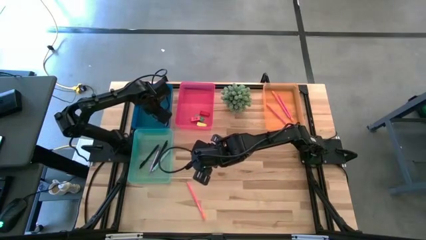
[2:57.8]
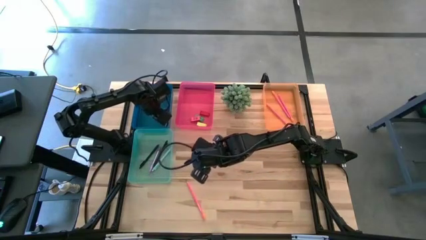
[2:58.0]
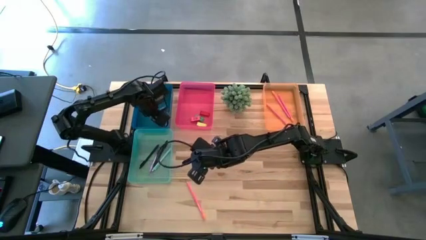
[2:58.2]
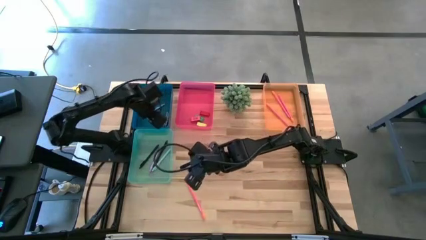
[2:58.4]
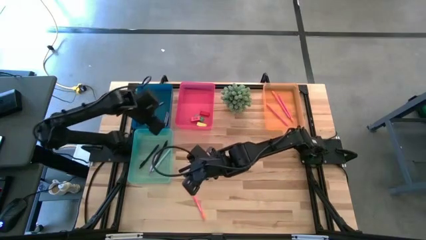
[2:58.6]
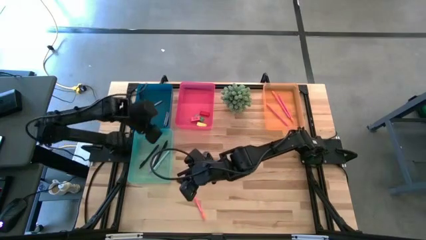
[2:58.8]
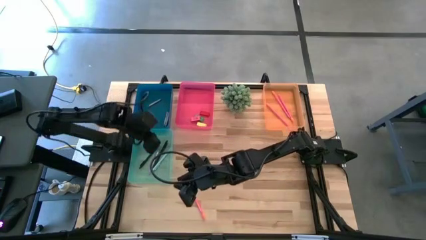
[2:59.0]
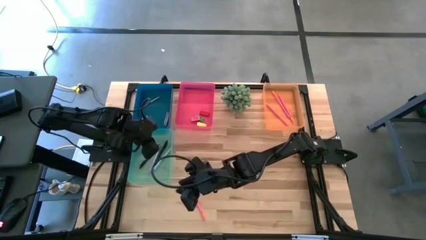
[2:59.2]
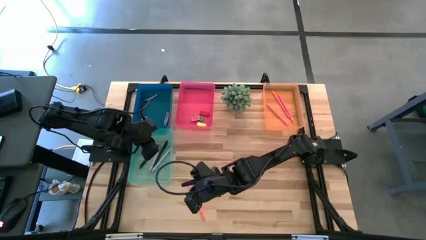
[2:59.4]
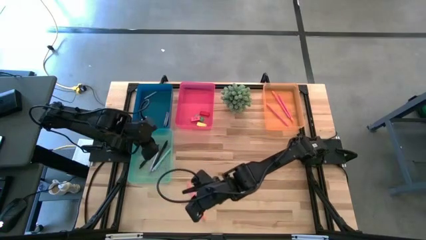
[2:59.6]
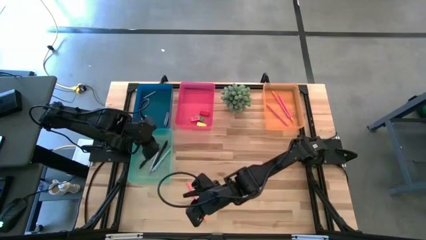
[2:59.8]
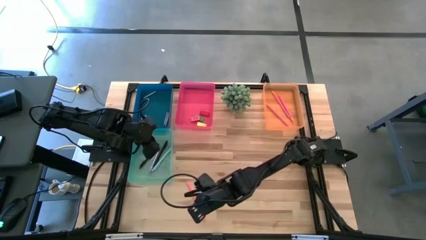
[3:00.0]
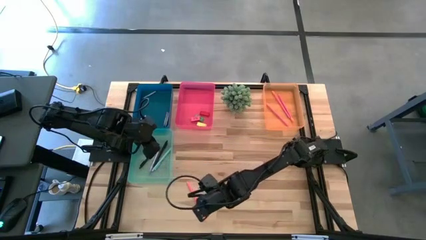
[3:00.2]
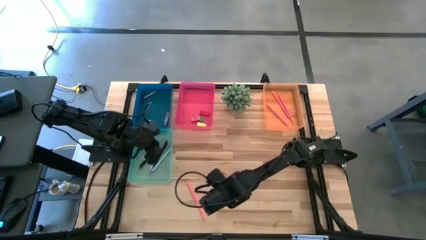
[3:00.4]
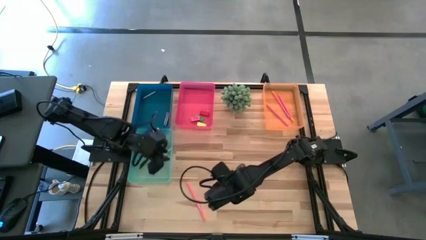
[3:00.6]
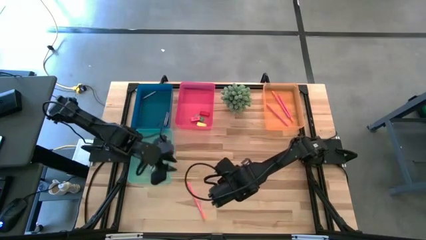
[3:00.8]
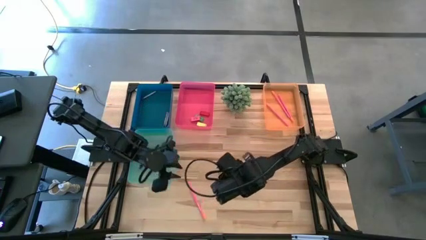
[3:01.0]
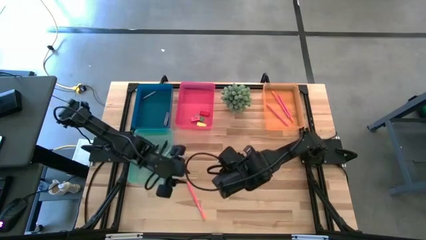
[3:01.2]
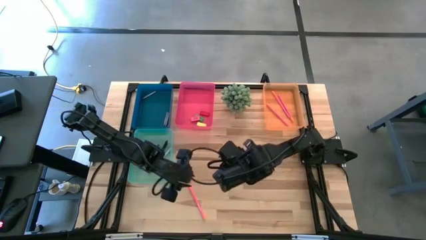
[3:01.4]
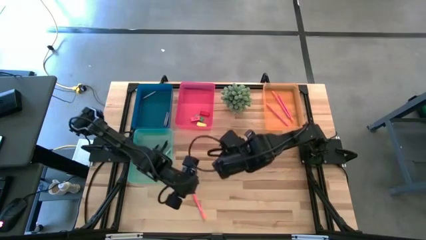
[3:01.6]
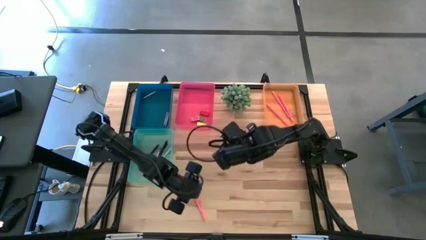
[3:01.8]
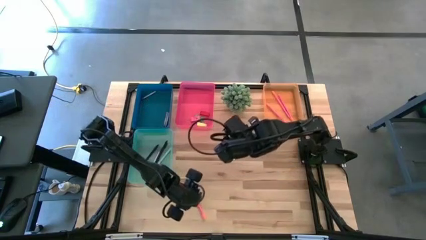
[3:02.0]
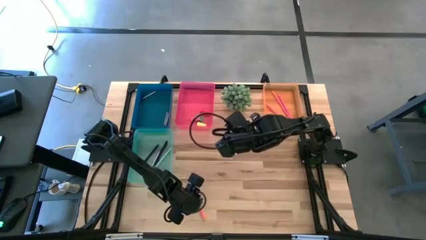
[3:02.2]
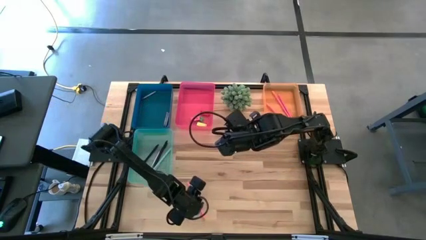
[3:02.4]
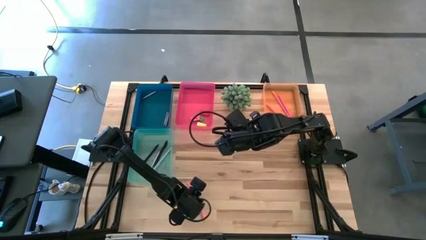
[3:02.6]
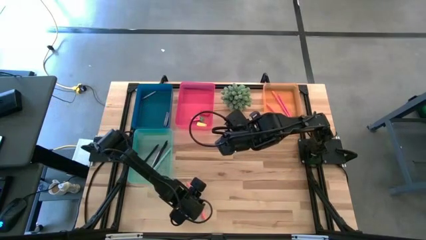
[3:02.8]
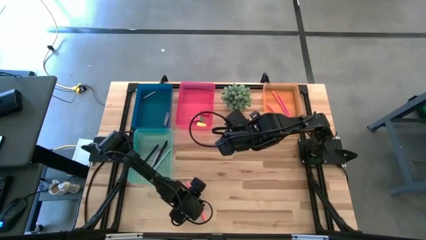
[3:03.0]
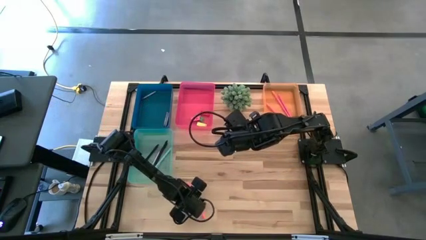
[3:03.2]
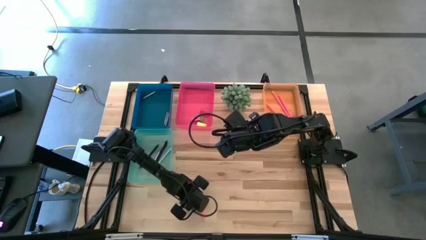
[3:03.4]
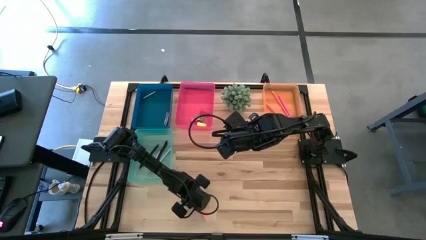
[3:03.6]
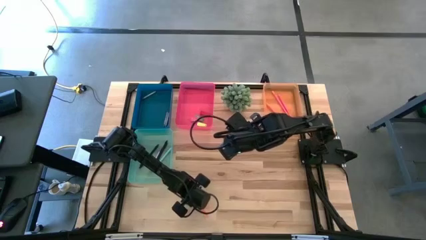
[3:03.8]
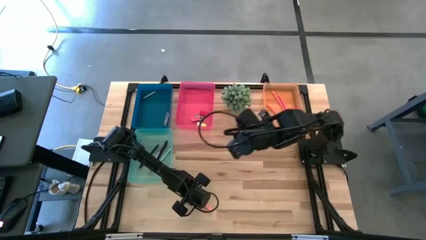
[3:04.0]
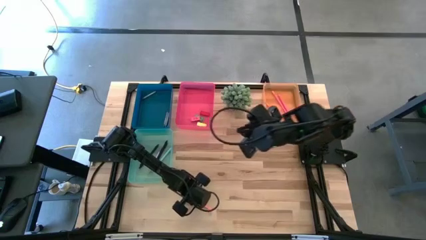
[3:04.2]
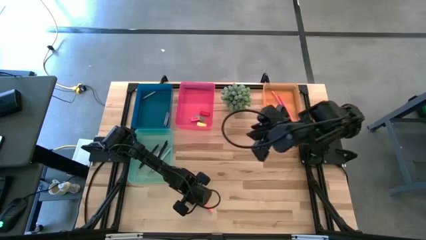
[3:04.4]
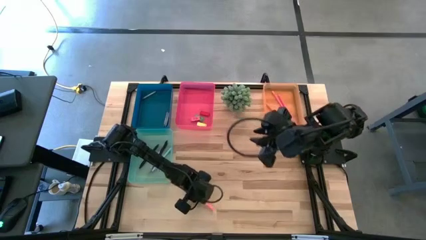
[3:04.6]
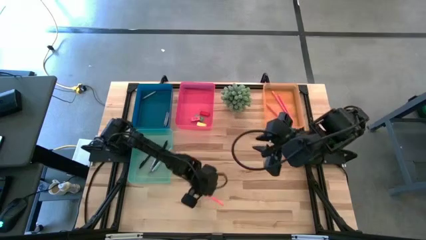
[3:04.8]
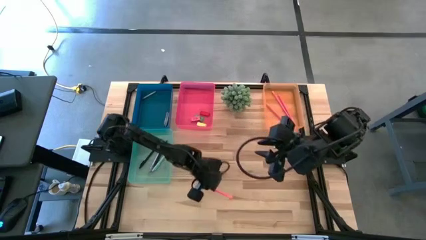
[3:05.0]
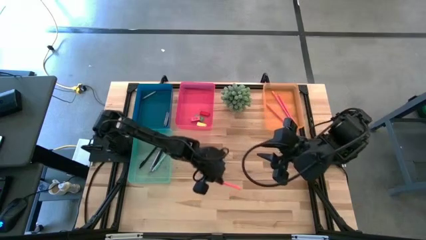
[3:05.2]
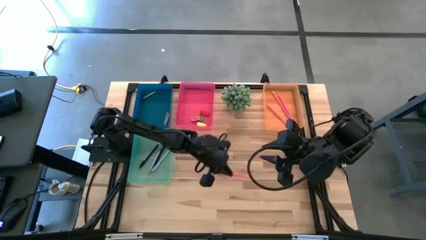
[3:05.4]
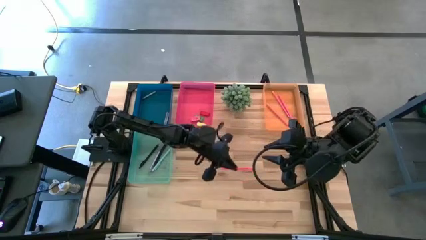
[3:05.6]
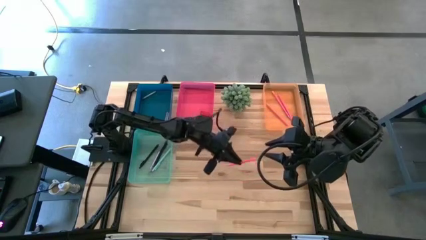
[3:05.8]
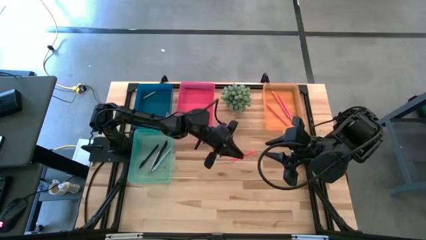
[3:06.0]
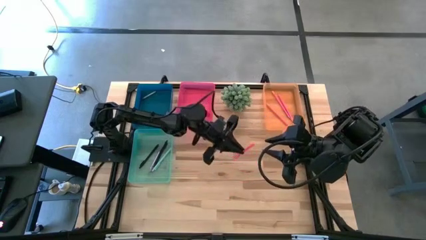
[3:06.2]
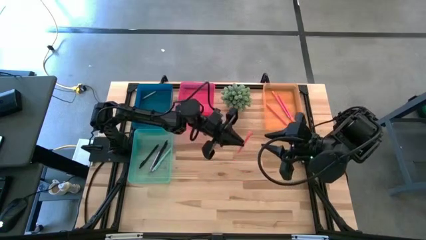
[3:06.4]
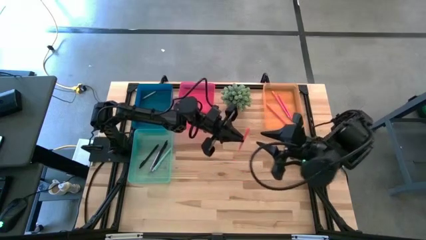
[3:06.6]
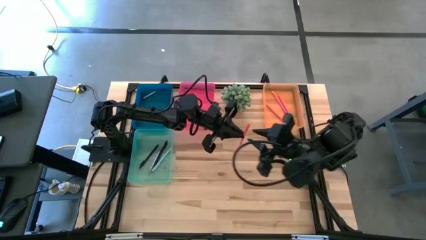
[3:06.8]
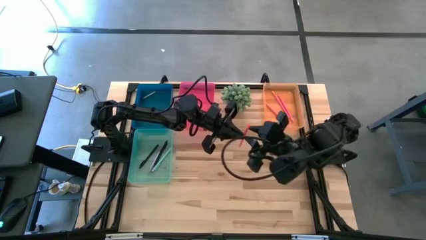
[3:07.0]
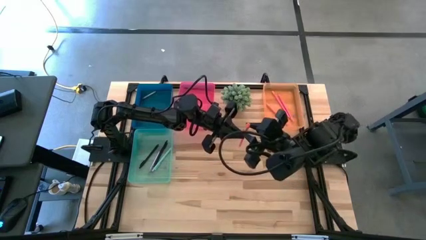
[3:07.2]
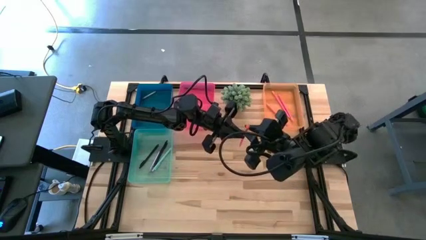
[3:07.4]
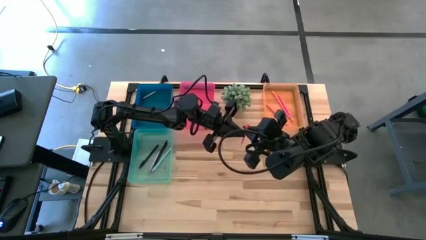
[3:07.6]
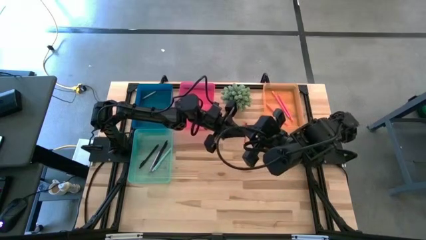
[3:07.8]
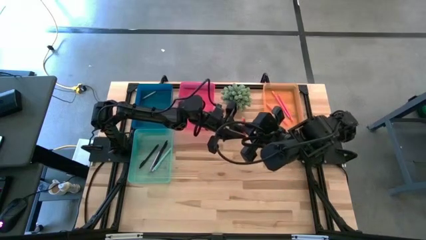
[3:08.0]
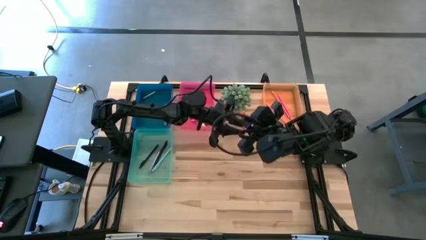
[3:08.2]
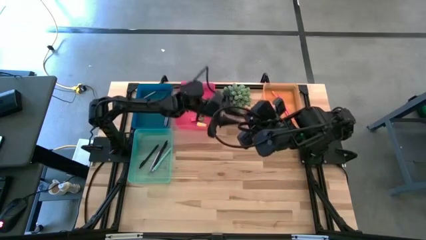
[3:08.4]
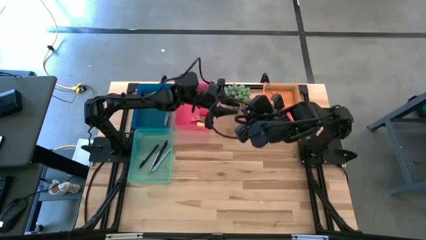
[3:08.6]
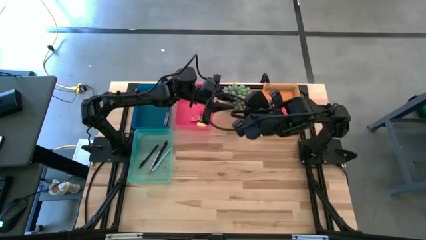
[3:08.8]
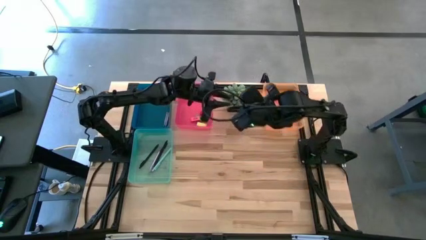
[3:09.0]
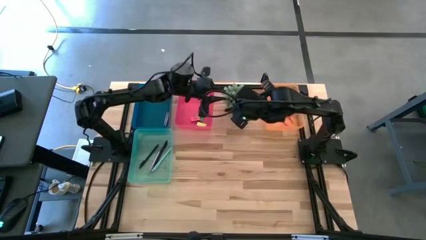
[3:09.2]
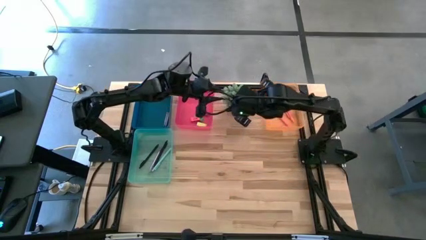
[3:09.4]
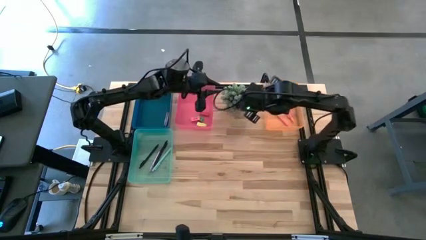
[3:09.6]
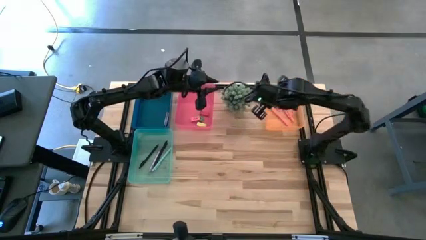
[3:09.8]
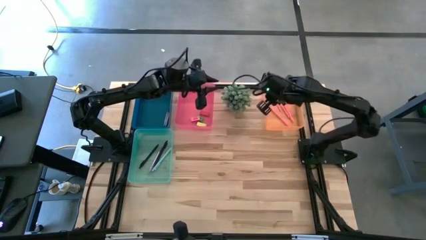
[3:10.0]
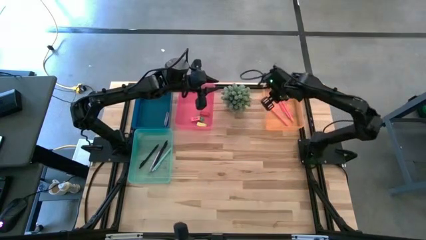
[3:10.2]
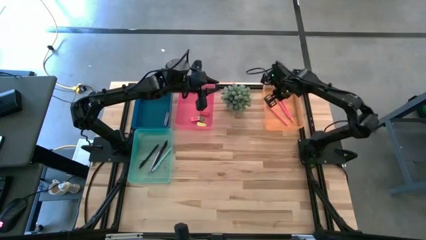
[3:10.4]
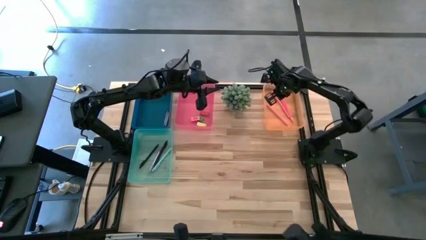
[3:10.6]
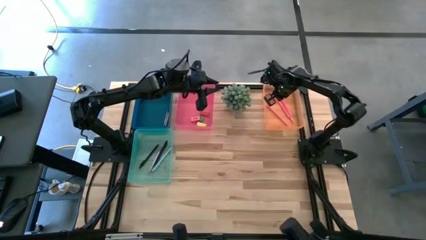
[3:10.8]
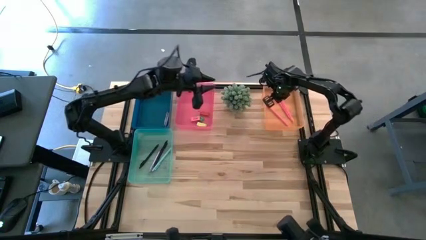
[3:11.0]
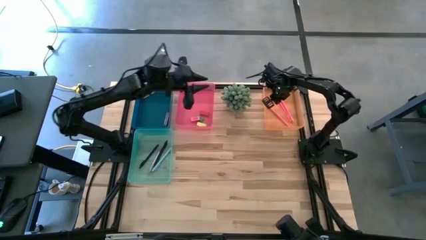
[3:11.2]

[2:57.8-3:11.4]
Task: Sort crayons/erasers/pens/pencils in bins
Put the pink pencil into the orange bin

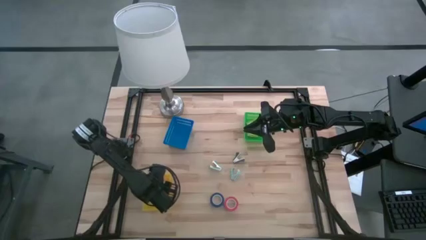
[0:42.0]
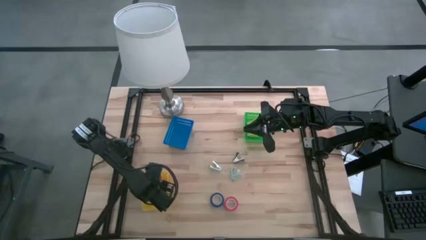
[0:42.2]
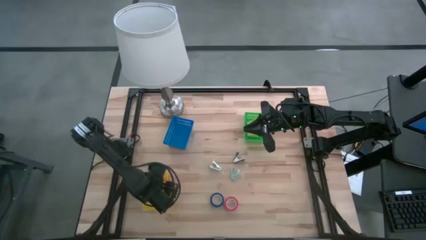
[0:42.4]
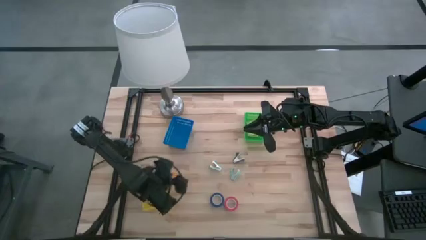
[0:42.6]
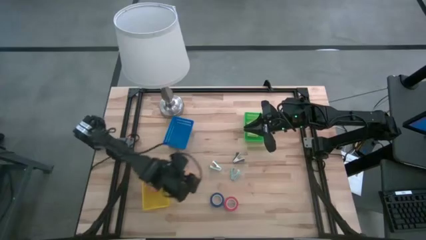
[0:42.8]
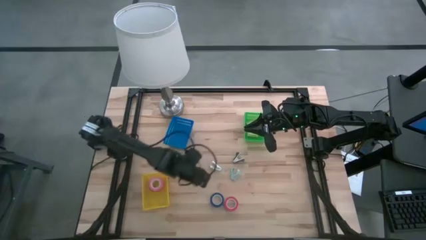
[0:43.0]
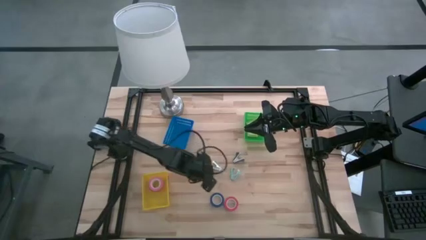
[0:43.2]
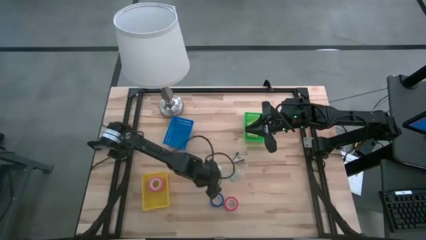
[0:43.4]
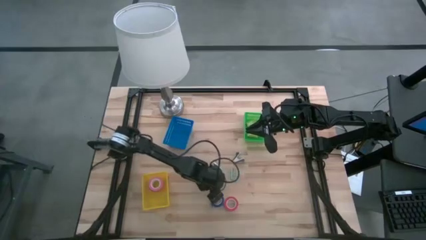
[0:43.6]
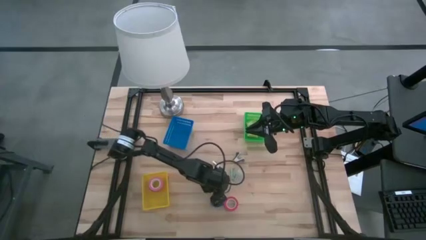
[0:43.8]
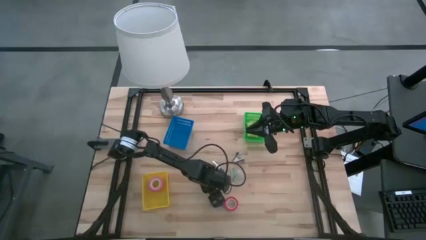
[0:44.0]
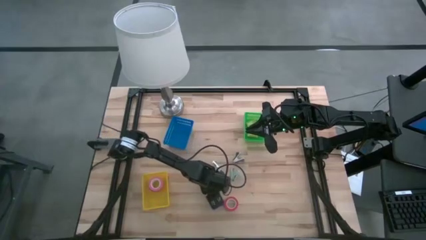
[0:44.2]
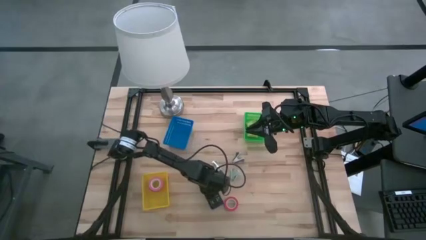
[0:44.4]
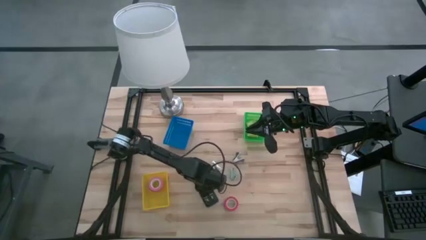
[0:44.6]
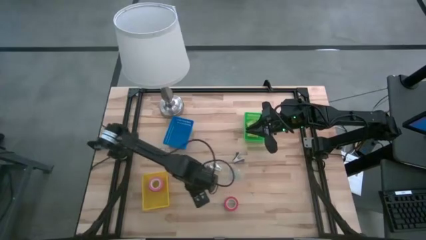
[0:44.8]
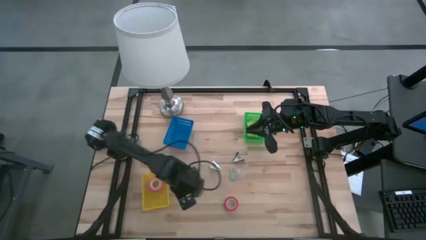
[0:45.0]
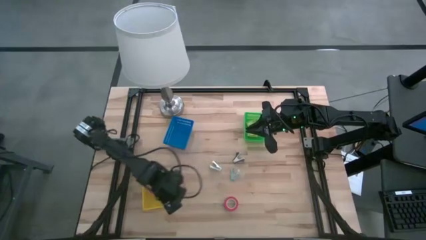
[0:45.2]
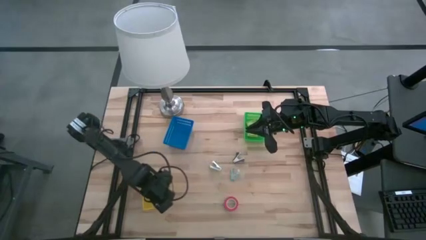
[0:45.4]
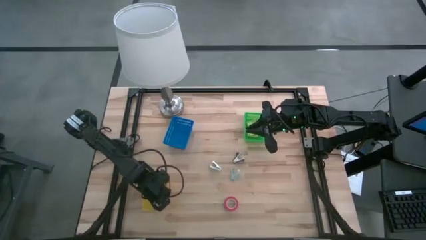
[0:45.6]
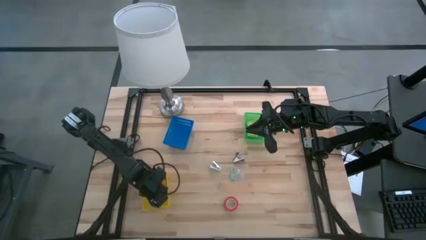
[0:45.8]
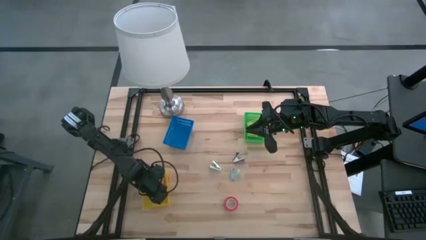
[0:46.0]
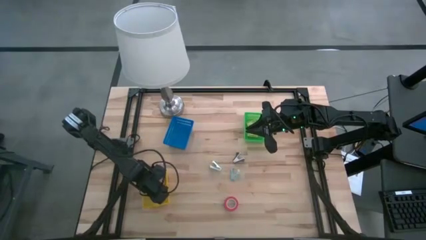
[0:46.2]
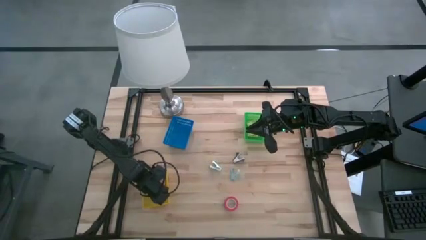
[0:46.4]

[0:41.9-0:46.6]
Task: Pick and place Stapler, Stapler remover, tape
Put the blue tape into the yellow bin
